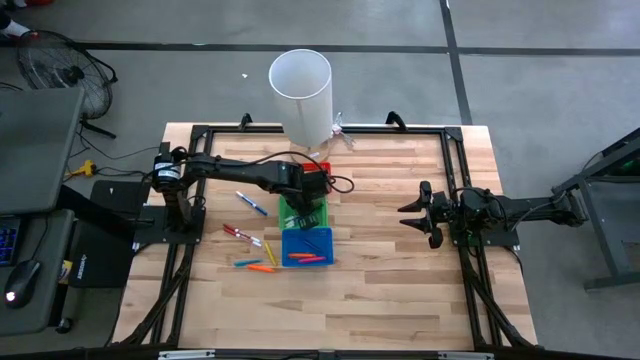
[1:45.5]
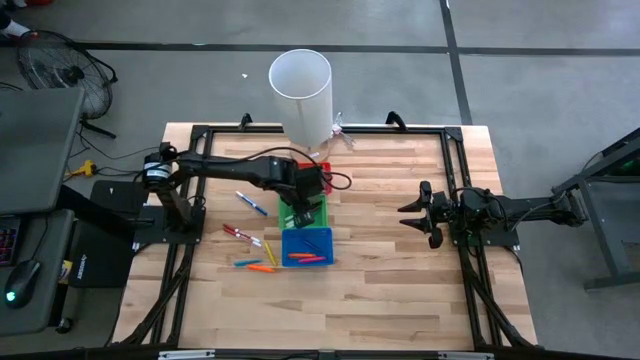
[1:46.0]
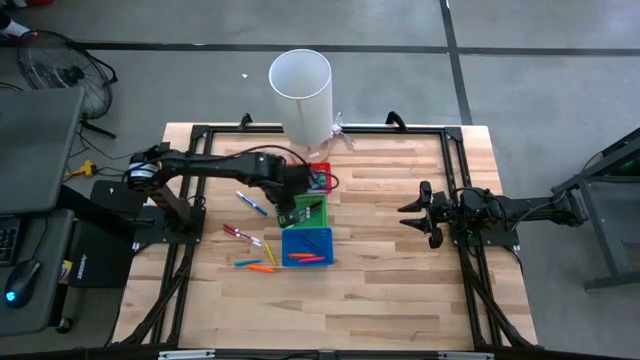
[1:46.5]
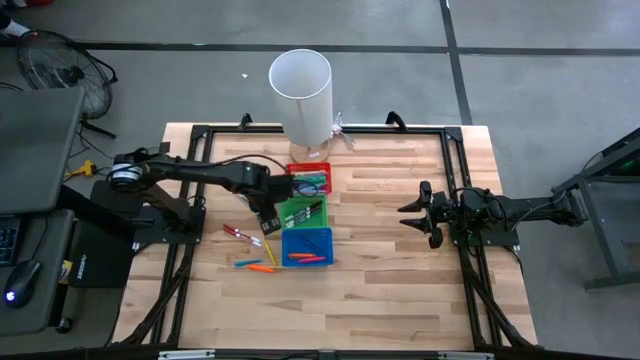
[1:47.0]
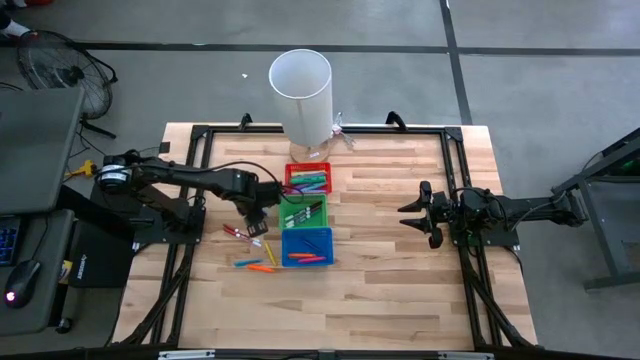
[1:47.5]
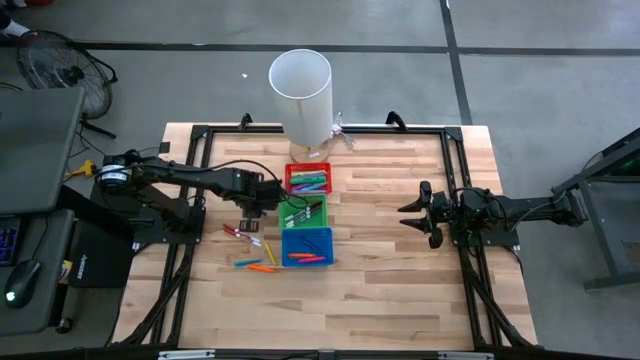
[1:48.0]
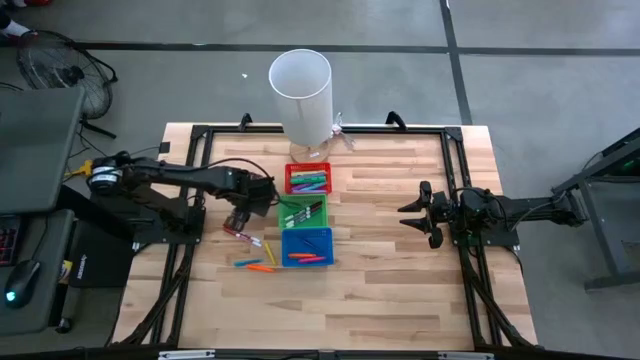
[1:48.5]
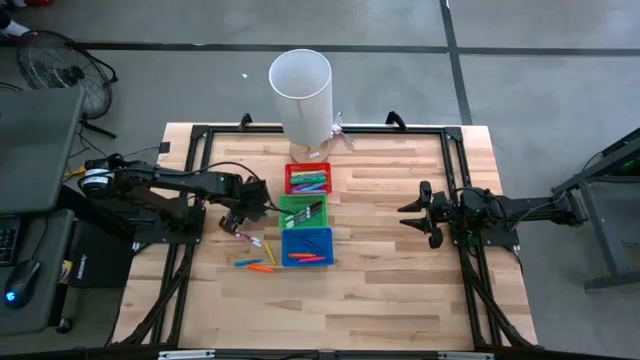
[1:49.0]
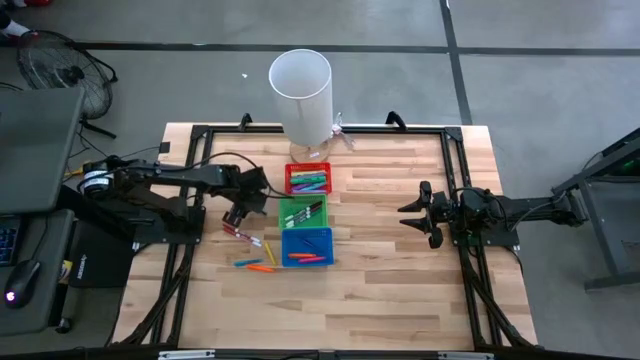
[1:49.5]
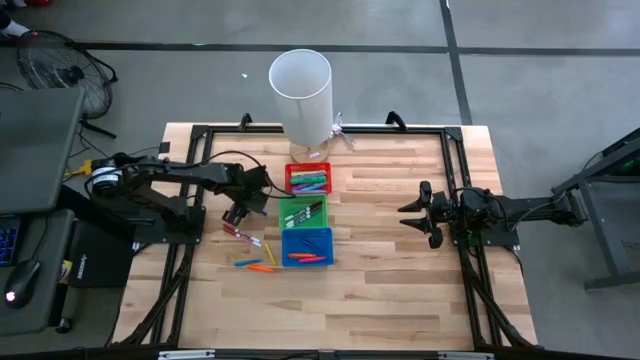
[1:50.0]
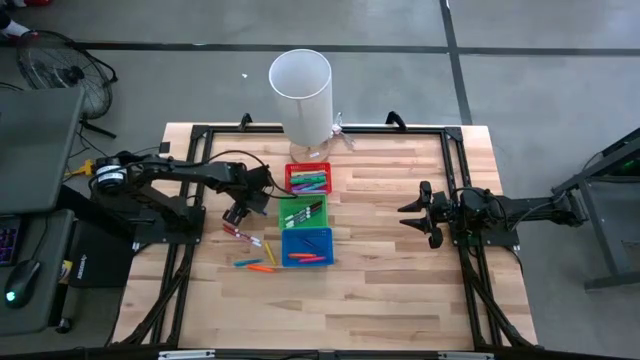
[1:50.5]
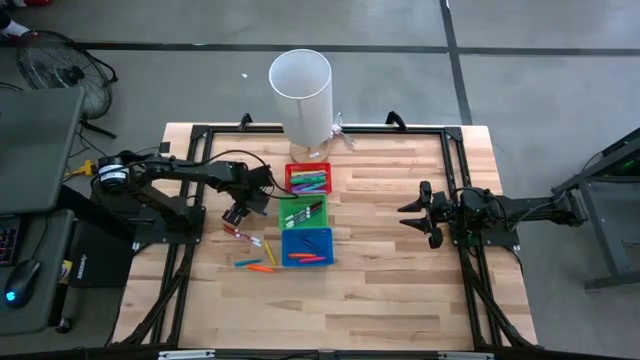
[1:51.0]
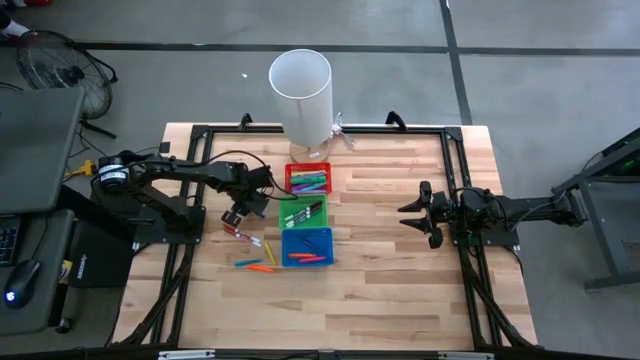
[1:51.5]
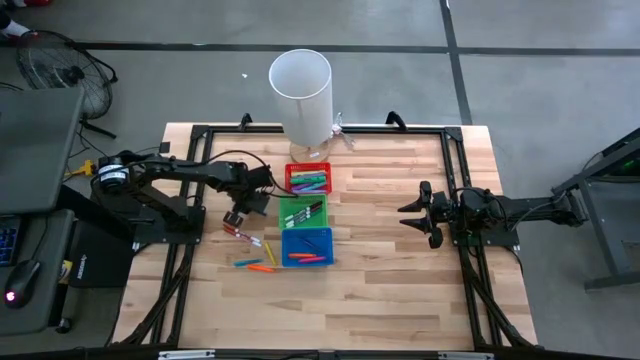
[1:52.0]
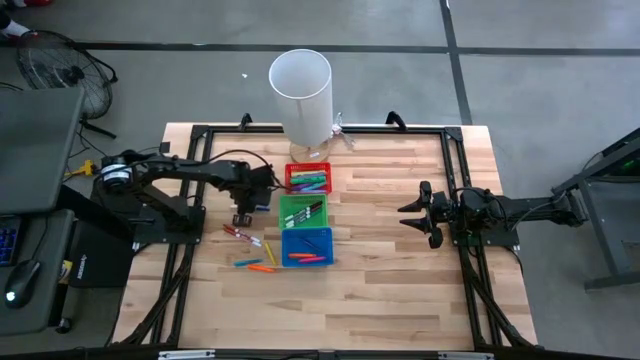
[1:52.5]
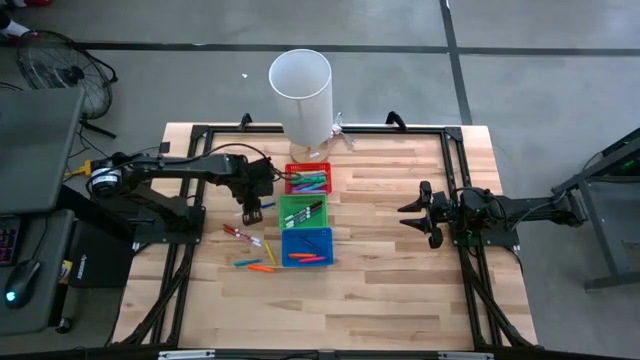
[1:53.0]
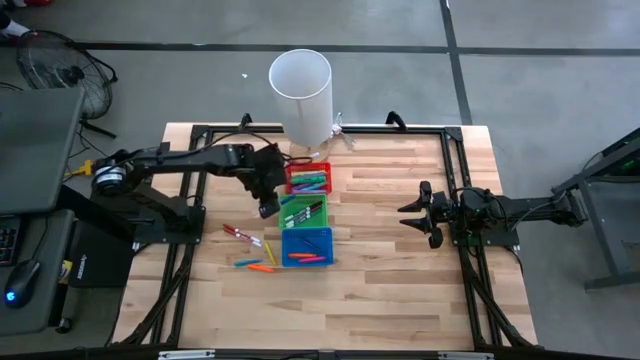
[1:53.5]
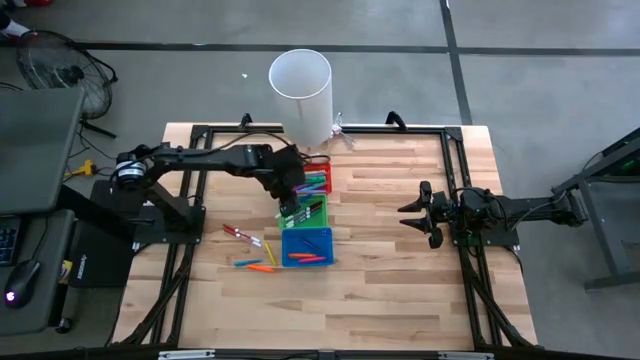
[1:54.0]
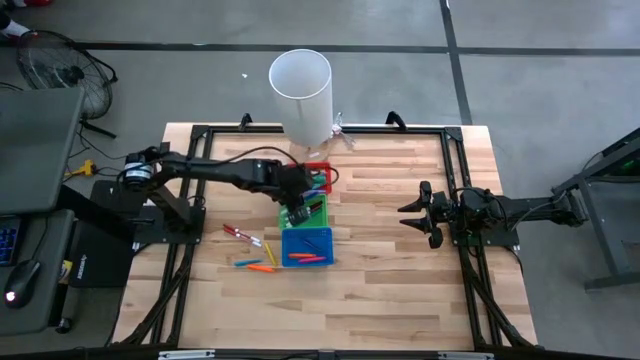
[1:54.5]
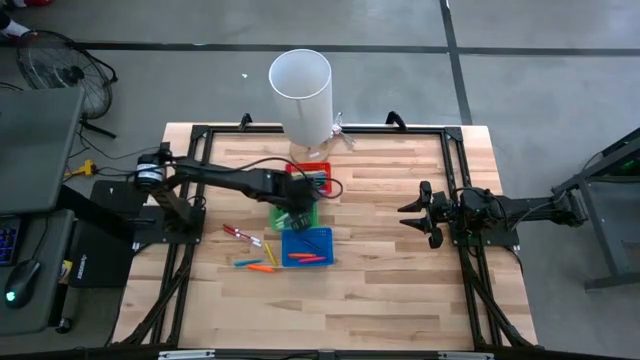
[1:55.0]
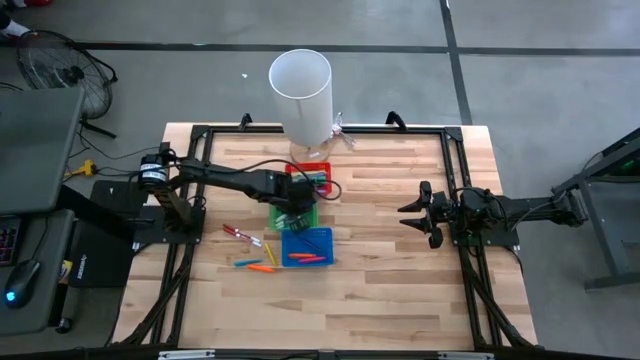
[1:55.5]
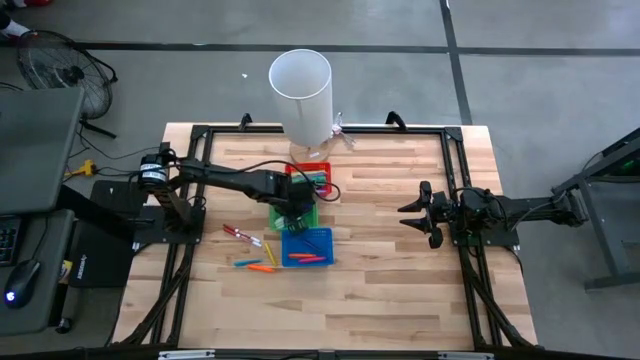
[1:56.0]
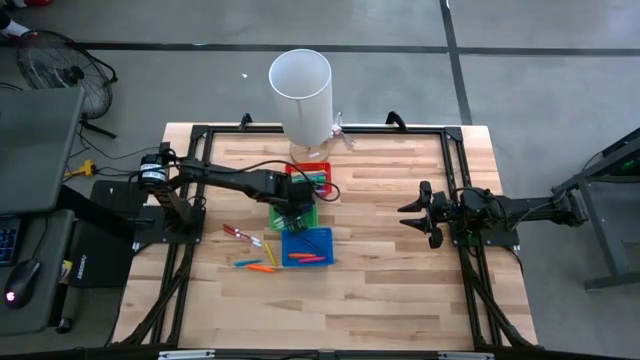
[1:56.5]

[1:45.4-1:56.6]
Task: Pick & Place Markers
Put the white and blue marker pen into the green bin

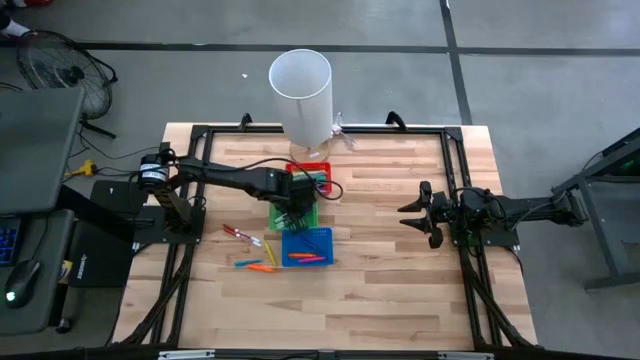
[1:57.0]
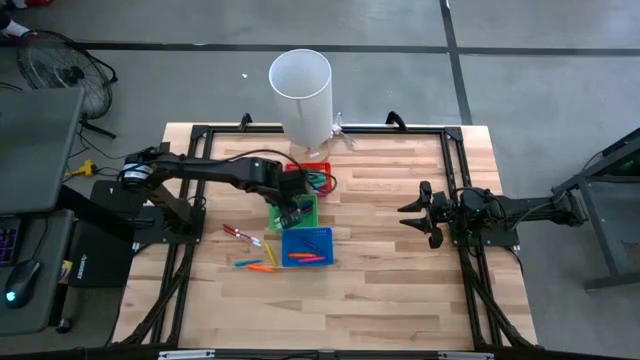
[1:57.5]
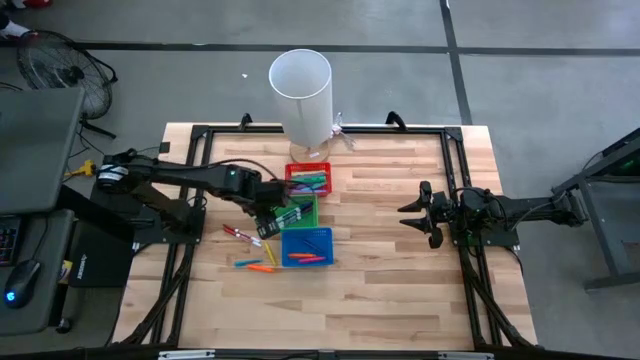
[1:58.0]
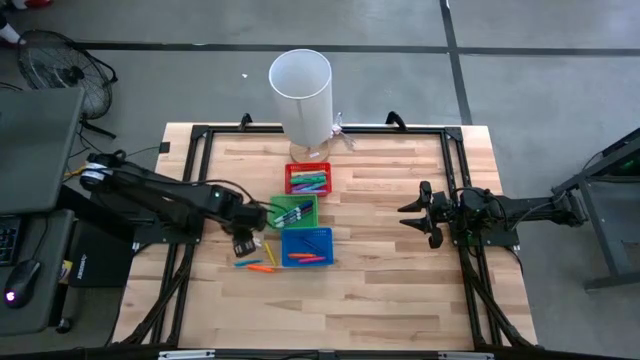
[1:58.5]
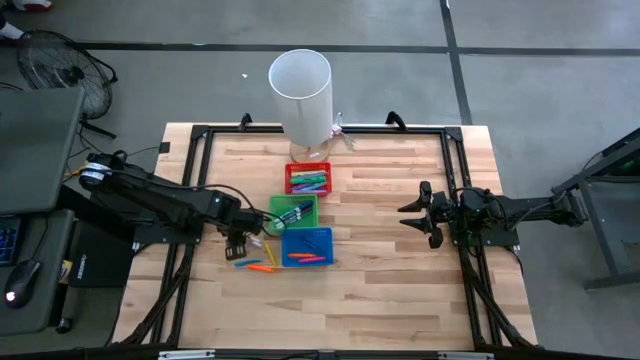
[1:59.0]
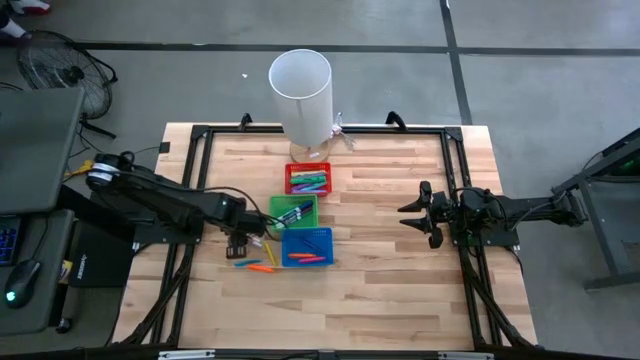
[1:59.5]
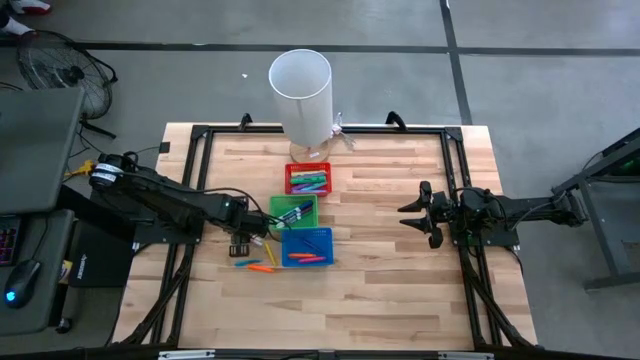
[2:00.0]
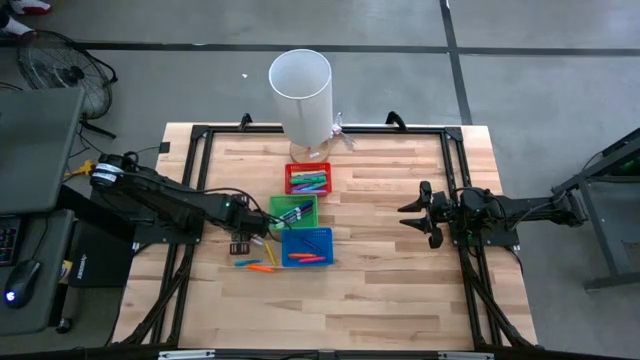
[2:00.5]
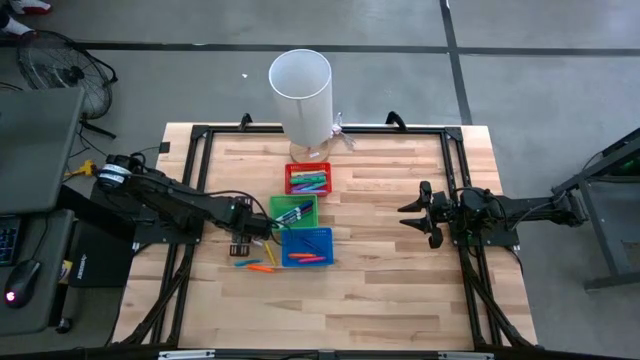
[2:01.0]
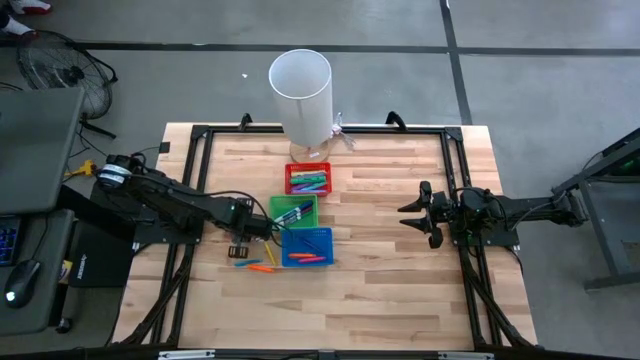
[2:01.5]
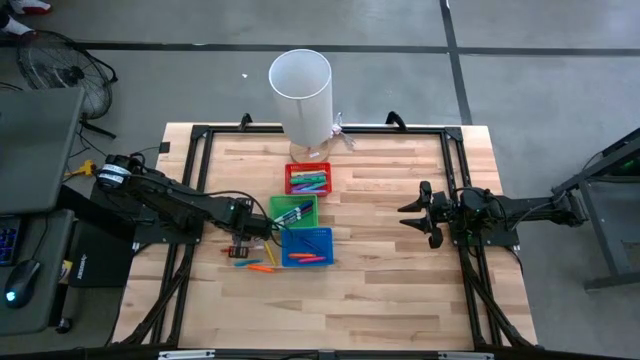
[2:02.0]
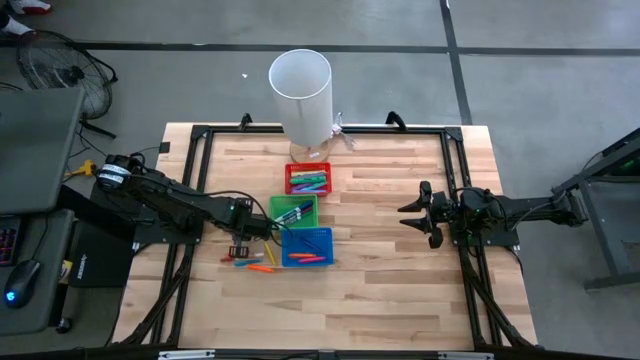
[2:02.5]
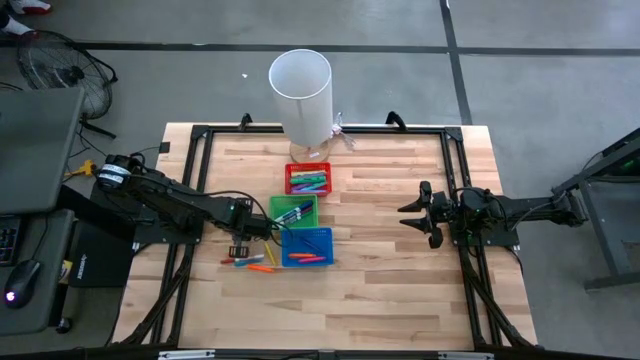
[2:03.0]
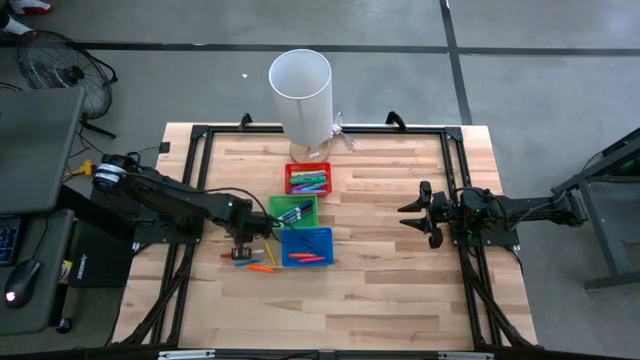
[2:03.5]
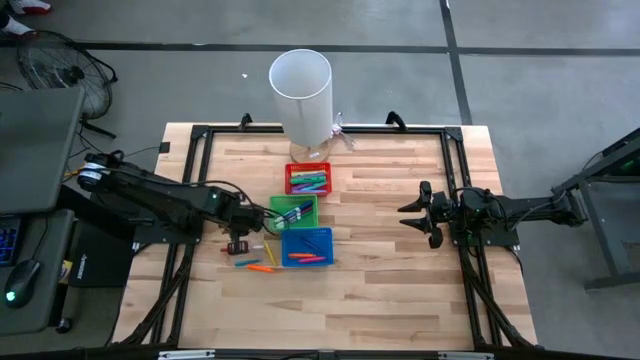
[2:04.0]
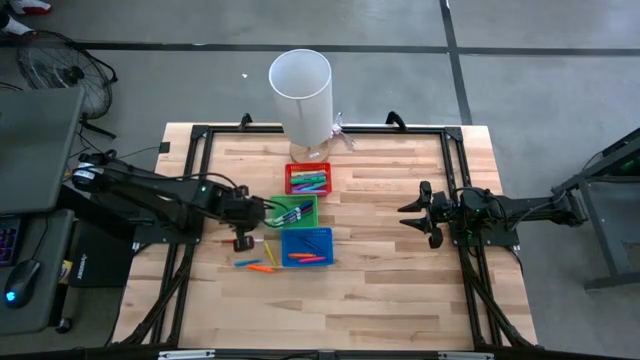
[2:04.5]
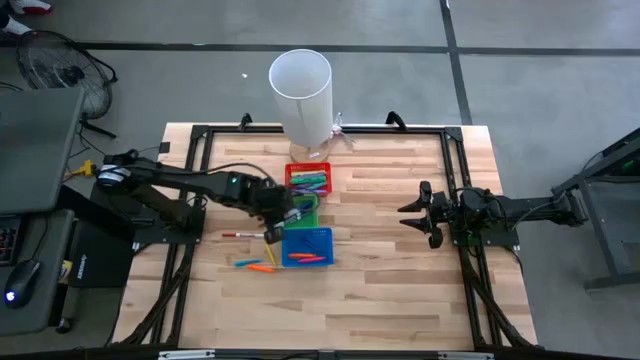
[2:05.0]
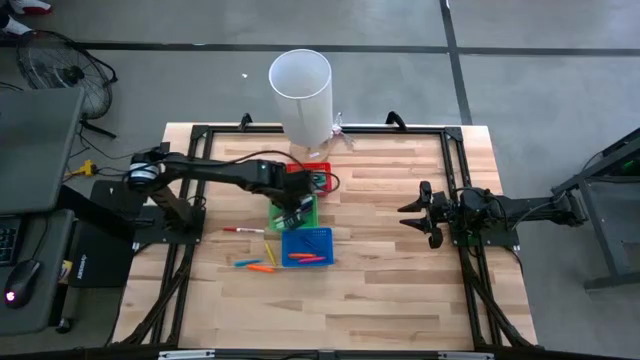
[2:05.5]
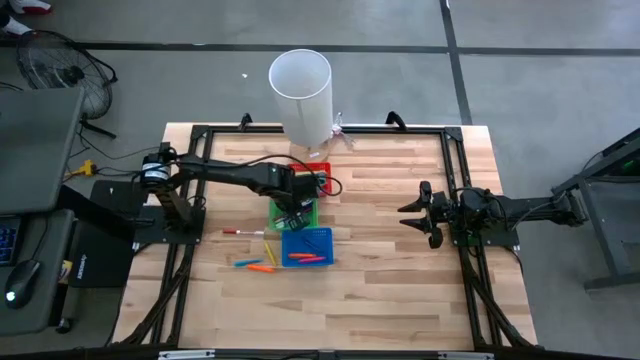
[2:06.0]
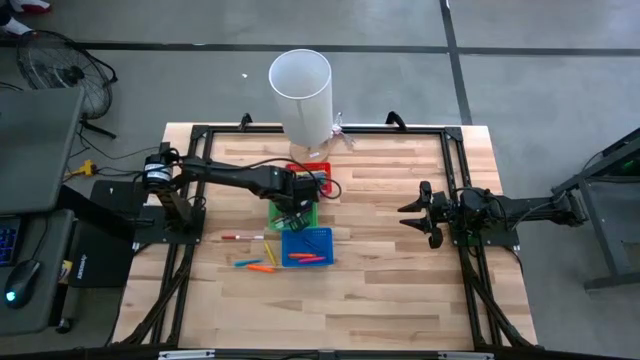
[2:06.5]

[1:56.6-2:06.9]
Put the white and brown marker pen into the green bin

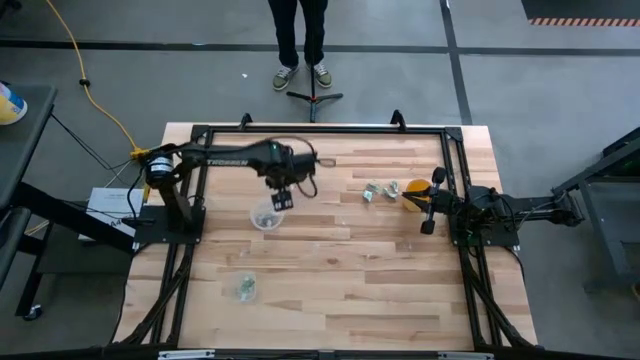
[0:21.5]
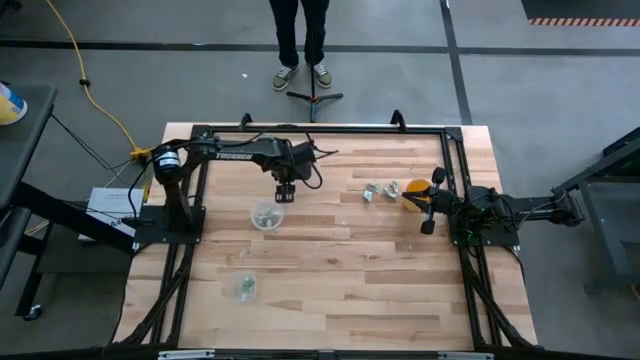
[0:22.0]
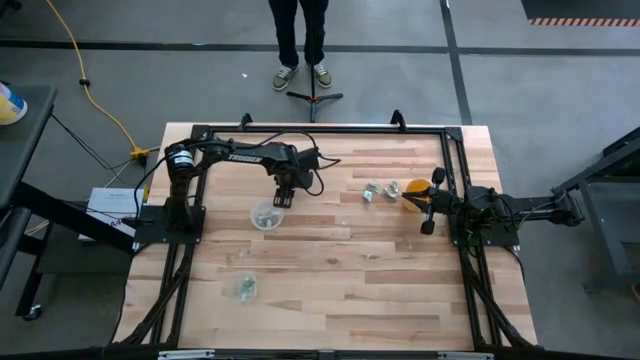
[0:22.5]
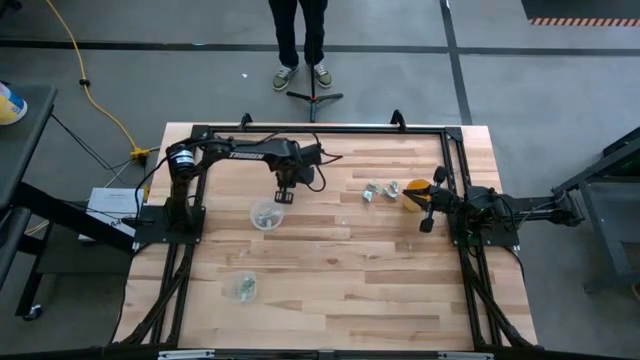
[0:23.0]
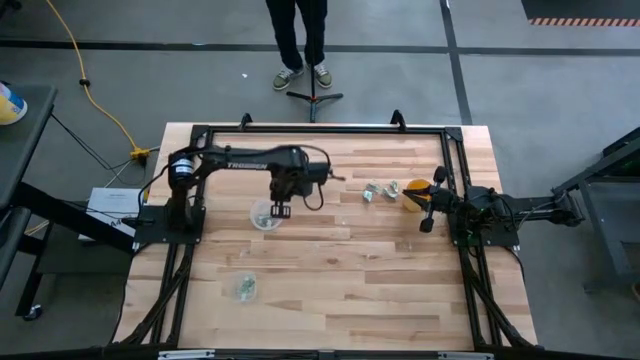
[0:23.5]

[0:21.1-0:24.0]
Task: Pick and place Stevia / Truvia into bins
Put the stevia packet in the top transparent container
